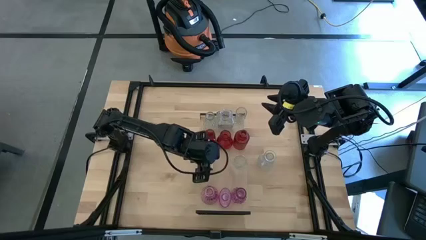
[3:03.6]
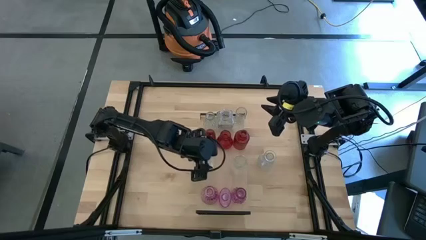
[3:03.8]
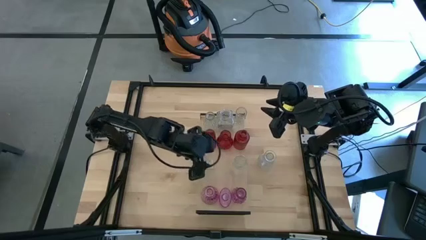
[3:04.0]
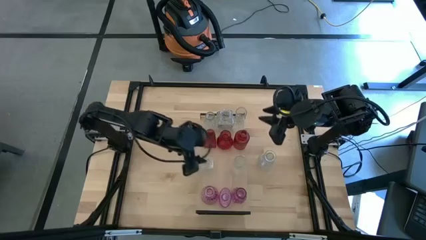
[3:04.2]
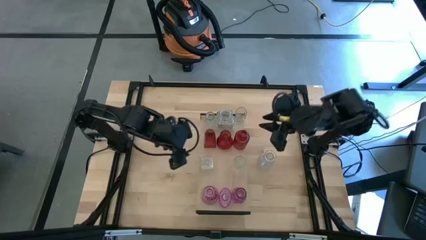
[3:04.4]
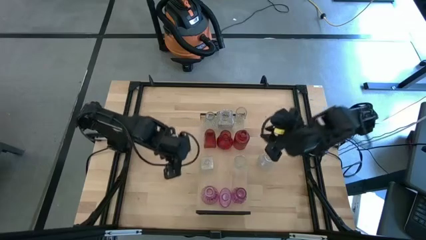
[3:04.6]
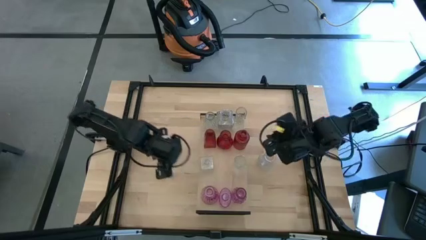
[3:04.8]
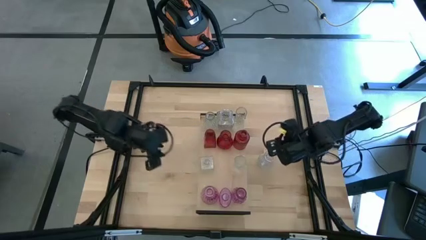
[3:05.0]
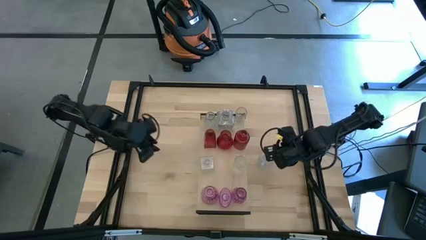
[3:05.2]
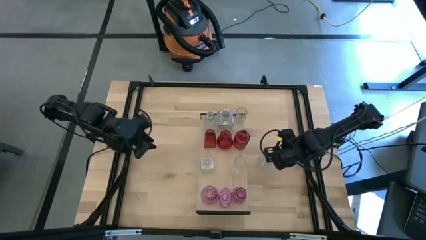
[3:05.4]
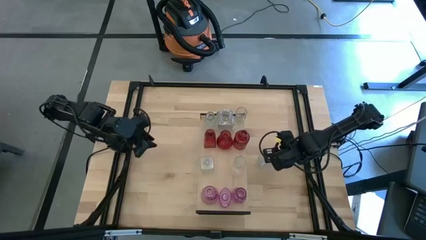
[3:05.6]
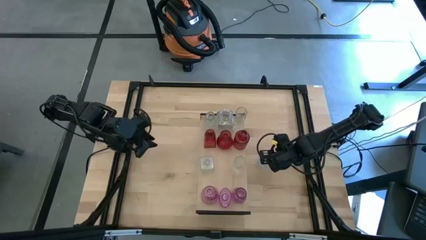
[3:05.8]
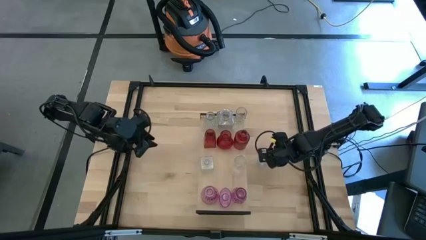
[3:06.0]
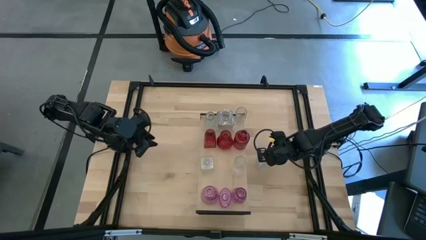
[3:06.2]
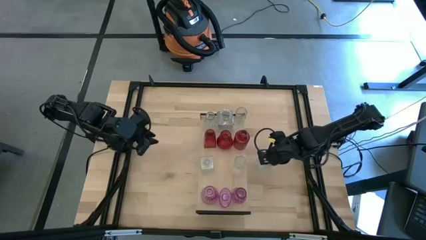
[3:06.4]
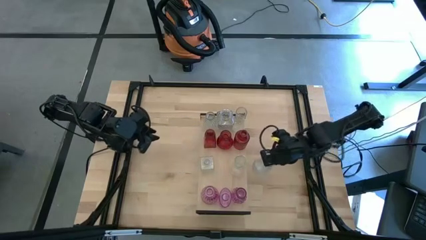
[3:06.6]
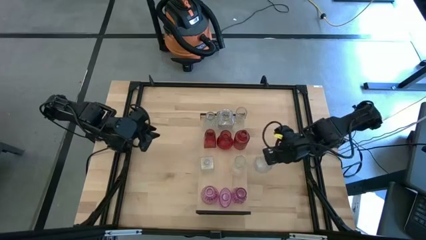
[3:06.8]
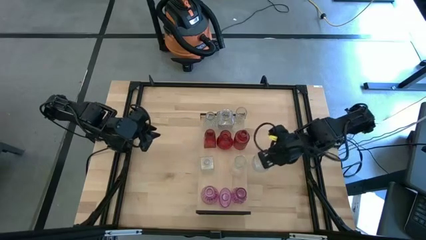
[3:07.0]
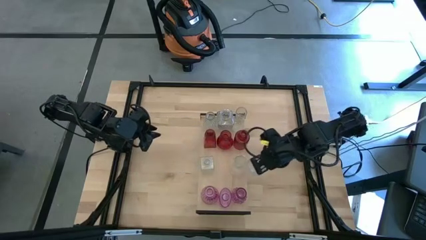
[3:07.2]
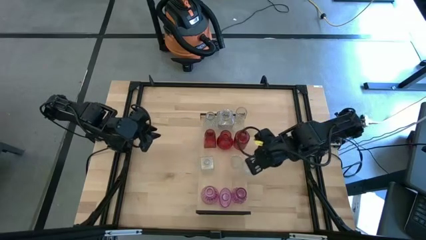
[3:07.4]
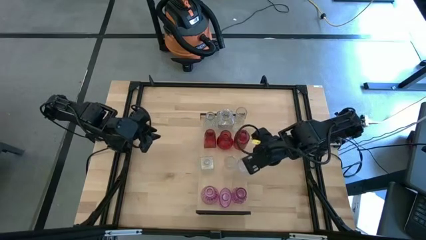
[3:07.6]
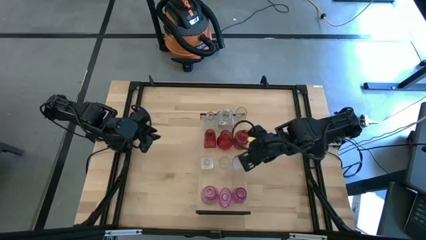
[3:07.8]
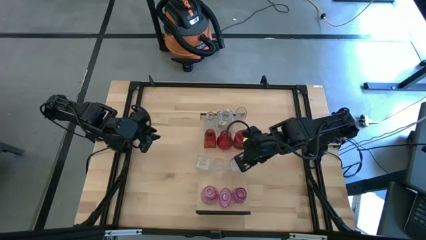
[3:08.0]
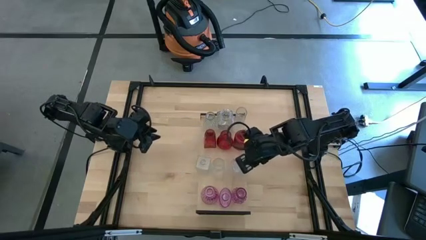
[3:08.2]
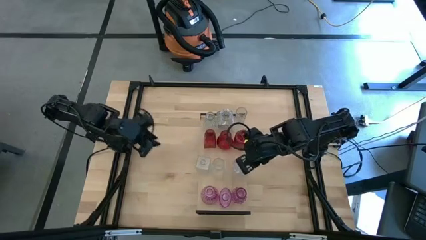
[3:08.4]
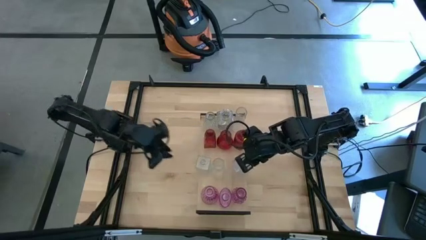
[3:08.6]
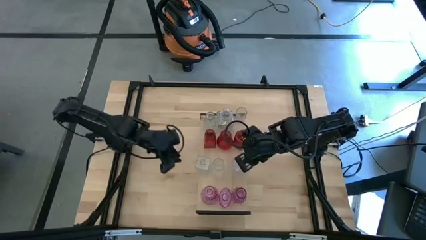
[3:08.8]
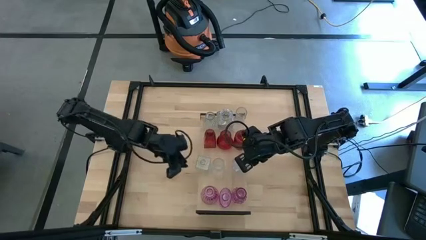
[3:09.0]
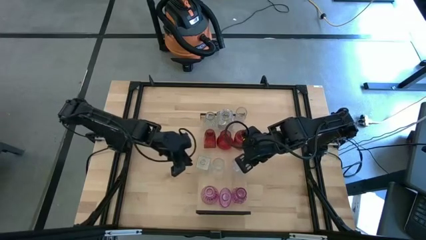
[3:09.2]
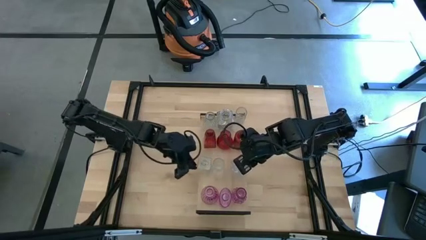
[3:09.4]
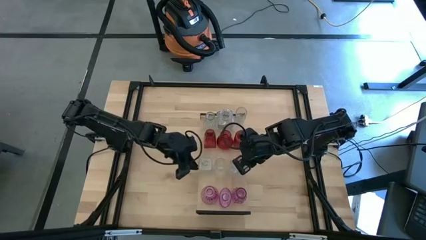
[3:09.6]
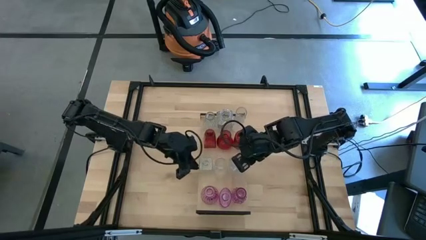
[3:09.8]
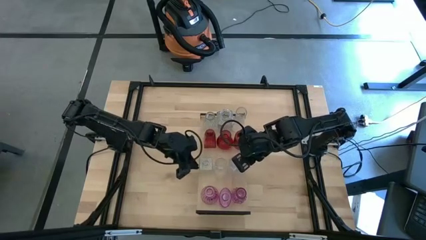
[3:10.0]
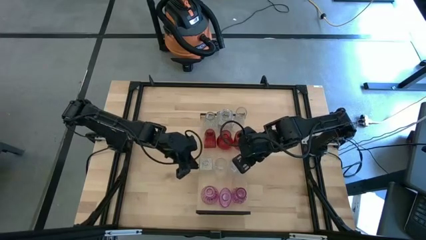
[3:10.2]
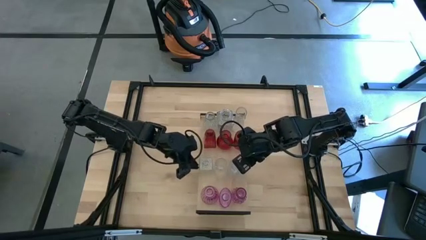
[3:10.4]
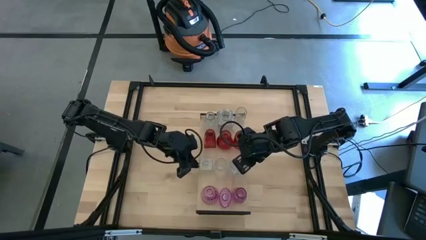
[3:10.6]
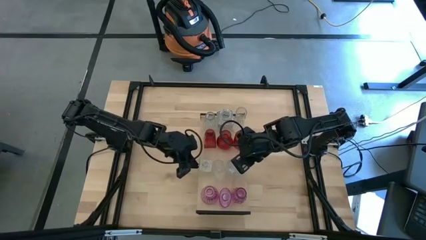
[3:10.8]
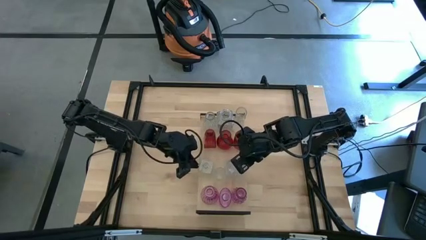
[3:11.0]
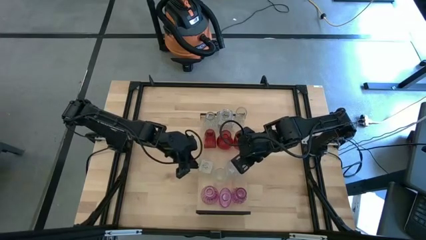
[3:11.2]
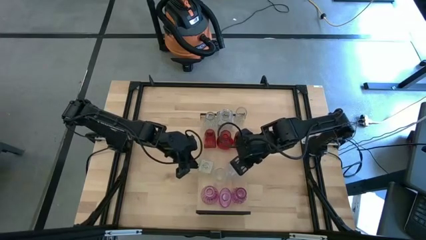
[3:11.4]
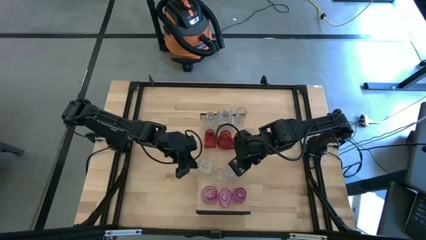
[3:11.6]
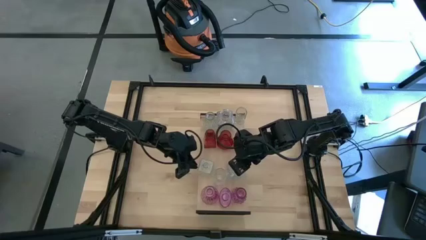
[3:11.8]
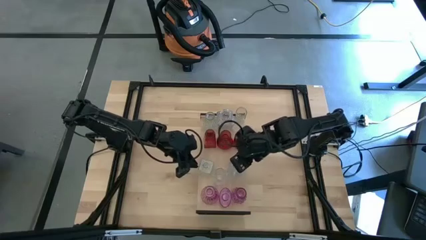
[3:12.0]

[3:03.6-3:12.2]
Task: sort vases onto shelf
Put the transparent vase on the shelf aligned with the transparent vases on the bottom

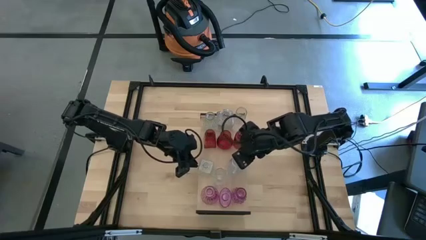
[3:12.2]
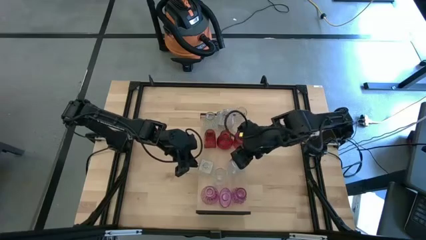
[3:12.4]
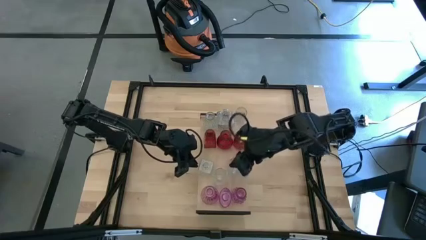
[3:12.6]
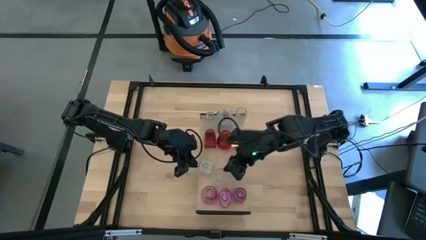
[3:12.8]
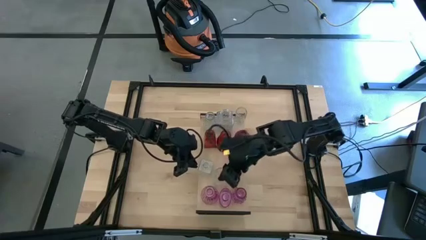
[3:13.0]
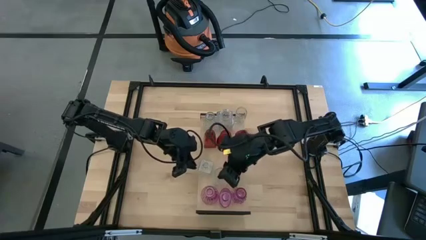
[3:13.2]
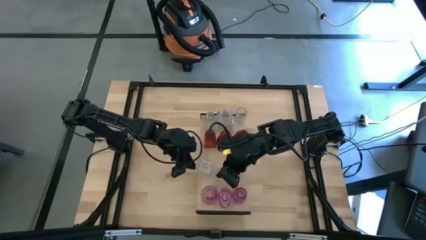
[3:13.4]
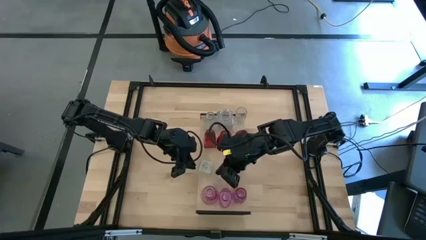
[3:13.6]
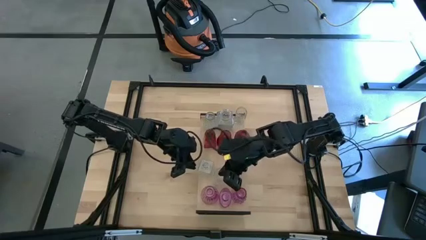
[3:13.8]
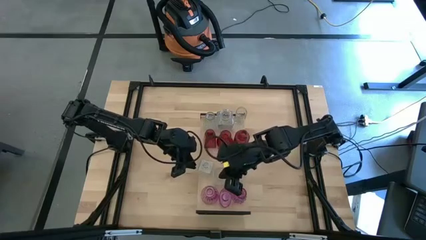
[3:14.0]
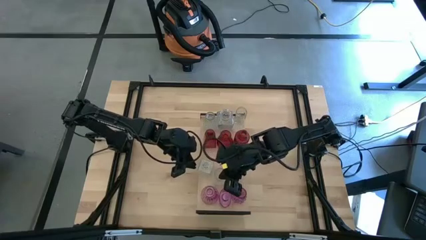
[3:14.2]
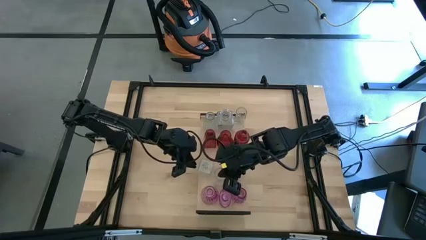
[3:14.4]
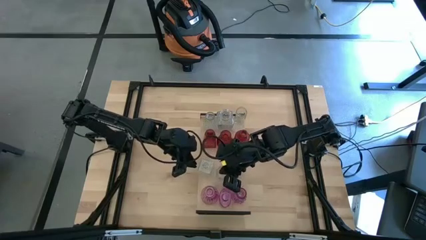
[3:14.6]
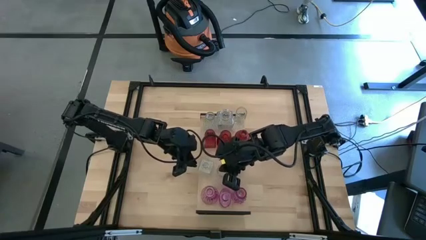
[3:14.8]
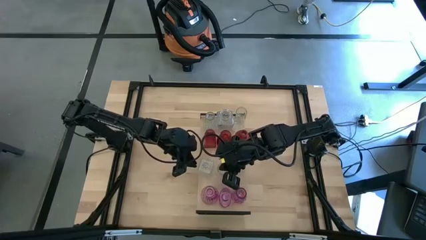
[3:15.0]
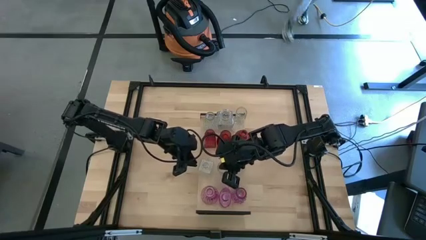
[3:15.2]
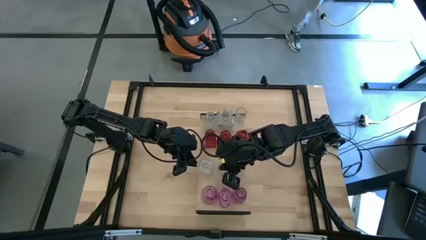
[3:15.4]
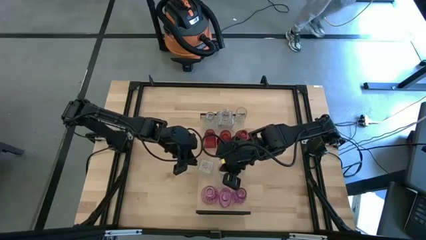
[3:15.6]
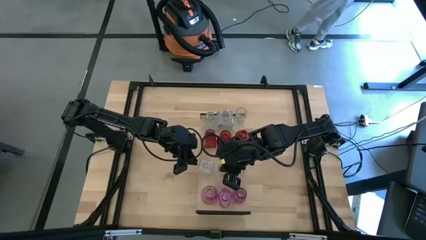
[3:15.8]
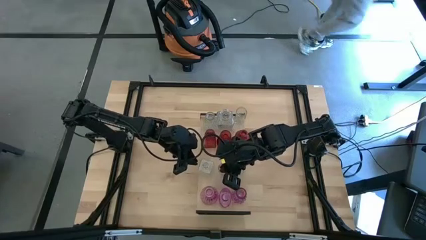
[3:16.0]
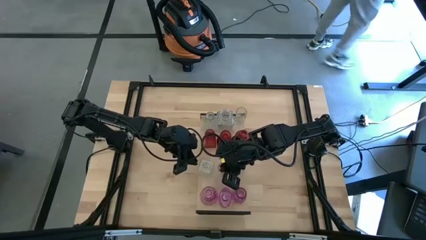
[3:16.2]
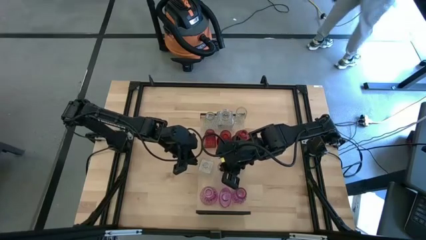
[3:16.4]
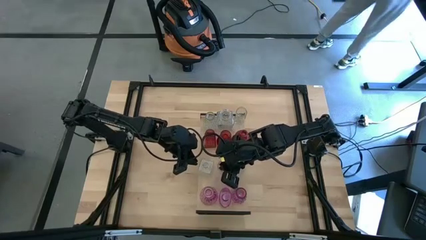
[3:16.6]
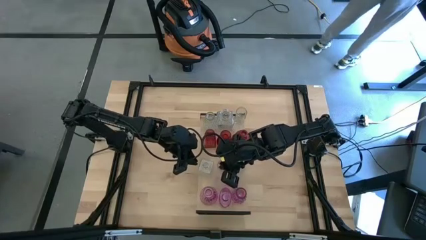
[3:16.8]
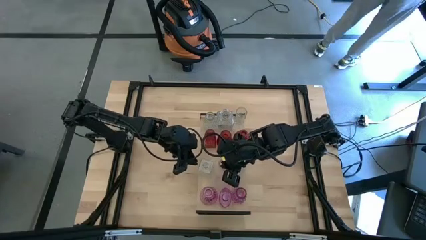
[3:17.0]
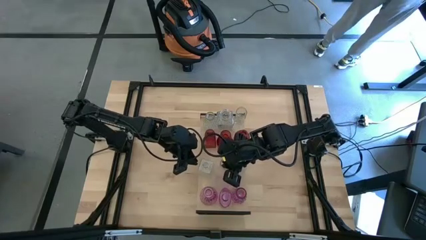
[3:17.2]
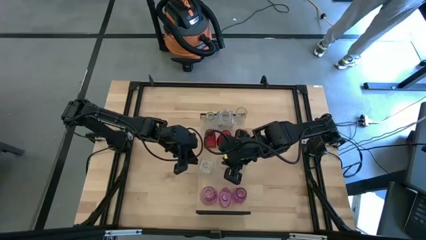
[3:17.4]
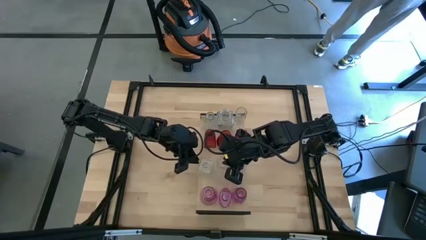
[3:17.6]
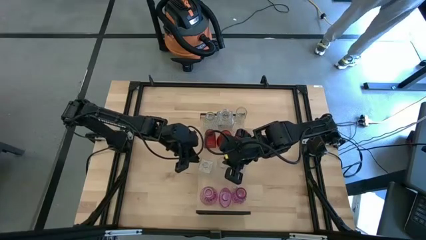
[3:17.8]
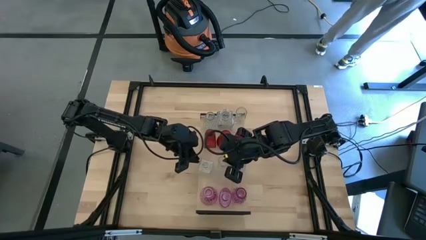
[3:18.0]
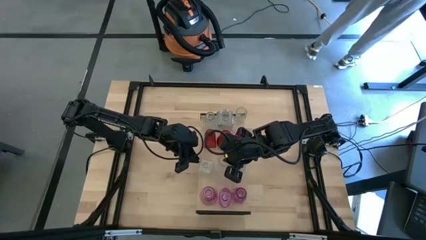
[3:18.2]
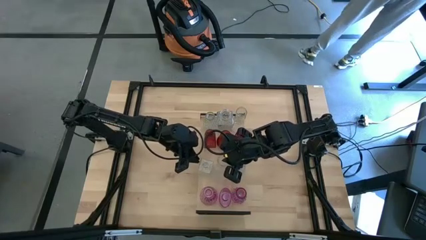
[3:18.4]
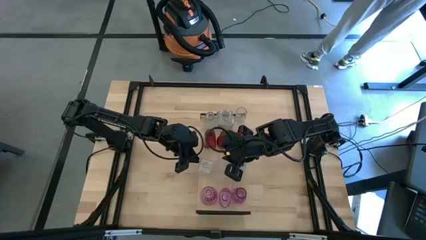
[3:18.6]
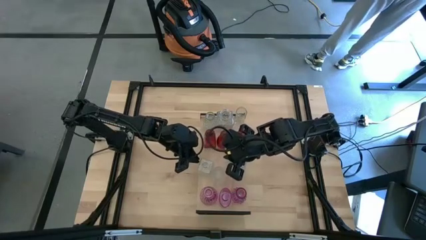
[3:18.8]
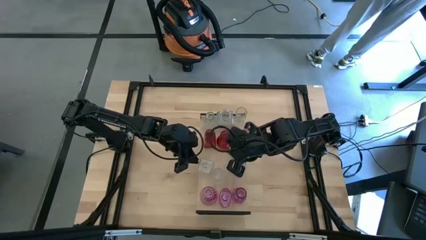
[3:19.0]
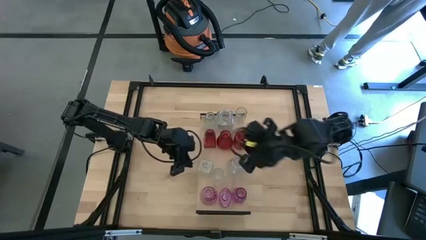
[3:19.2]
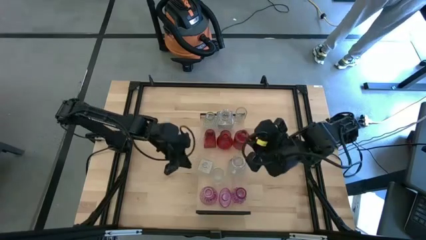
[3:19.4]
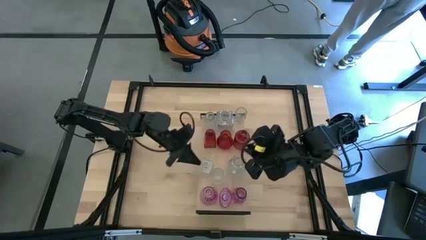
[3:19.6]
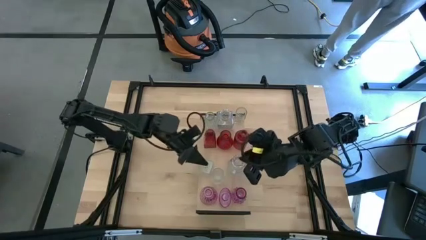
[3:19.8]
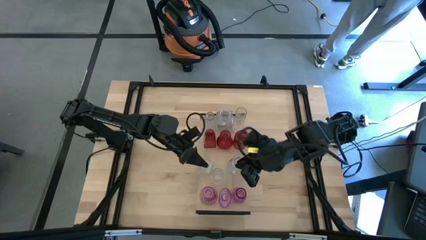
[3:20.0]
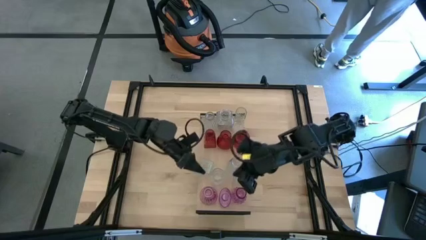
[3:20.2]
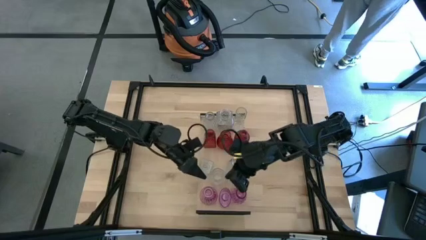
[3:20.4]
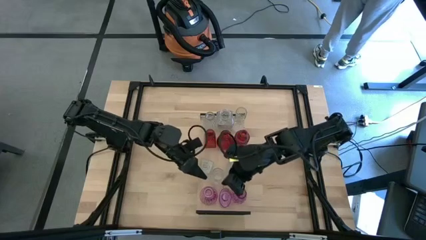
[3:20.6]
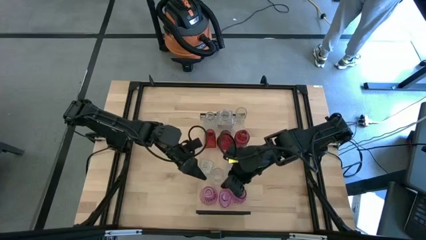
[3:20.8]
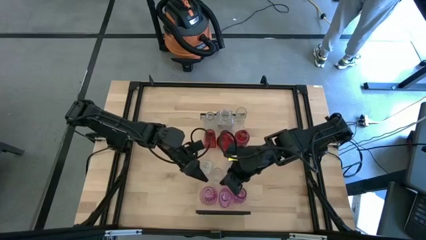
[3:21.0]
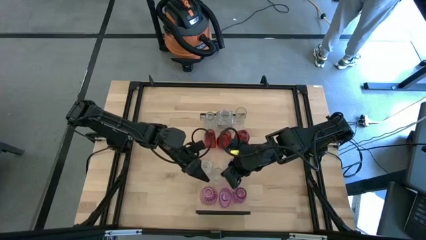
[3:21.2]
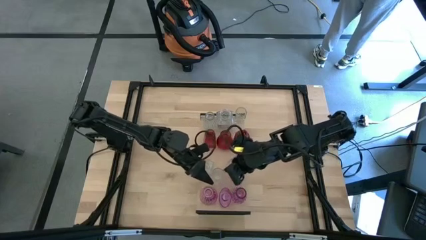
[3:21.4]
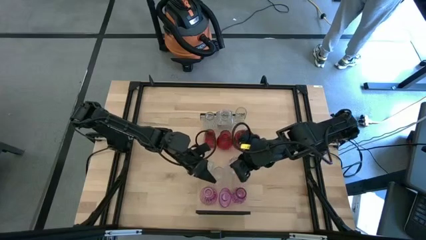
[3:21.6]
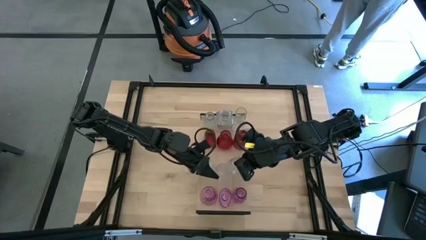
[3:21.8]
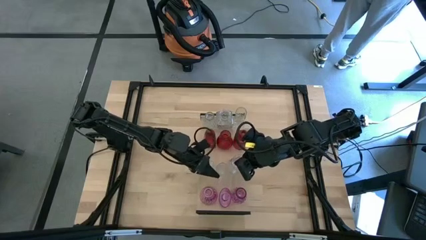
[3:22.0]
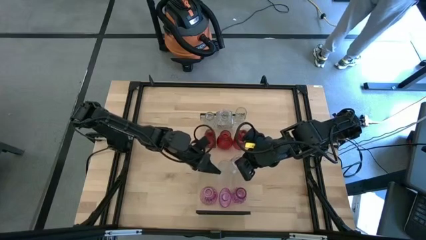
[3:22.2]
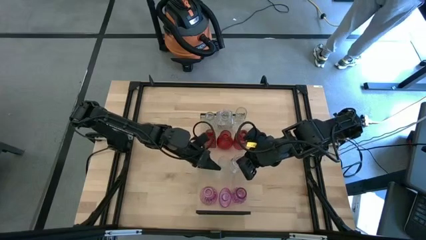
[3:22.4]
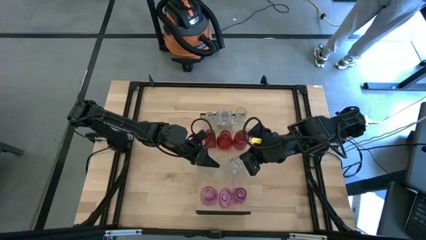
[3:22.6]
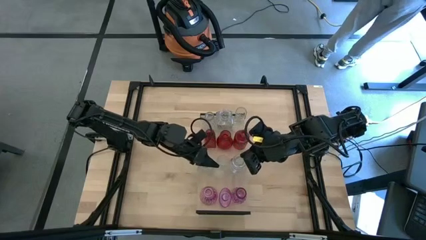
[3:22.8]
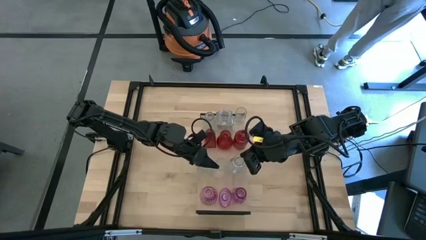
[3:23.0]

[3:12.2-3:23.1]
Adjust the transparent vase on the shelf
